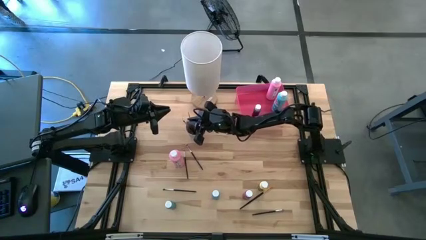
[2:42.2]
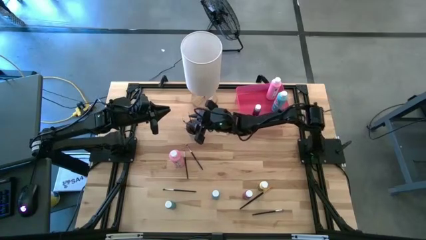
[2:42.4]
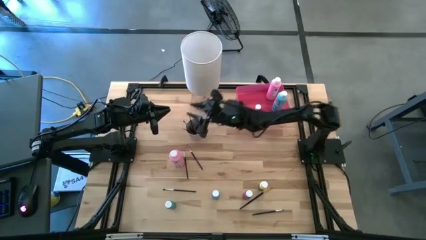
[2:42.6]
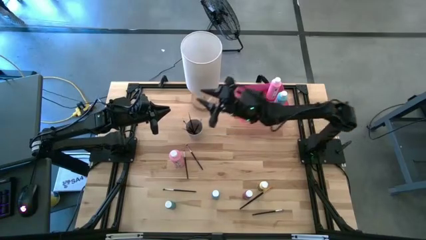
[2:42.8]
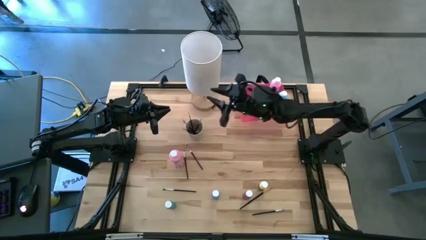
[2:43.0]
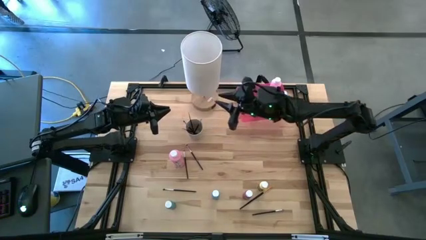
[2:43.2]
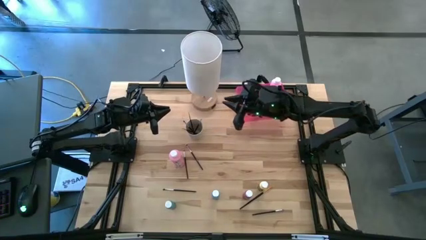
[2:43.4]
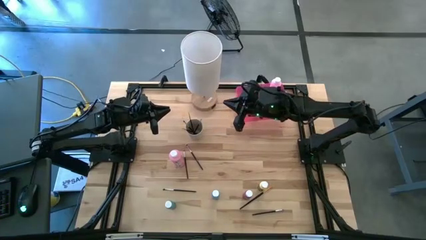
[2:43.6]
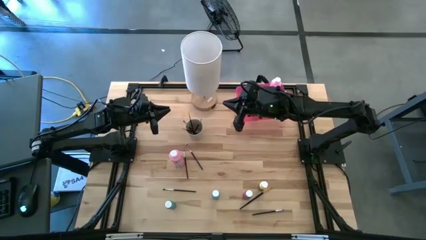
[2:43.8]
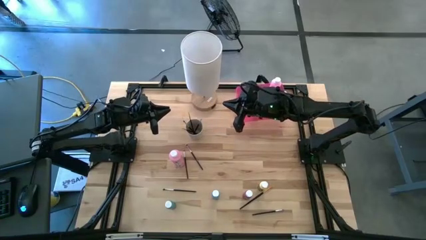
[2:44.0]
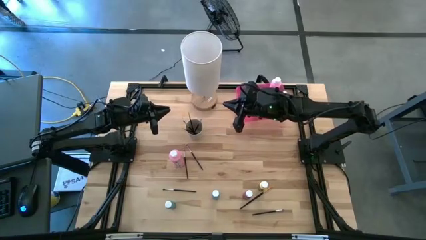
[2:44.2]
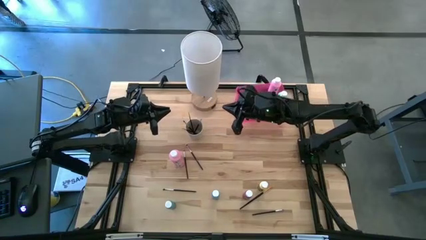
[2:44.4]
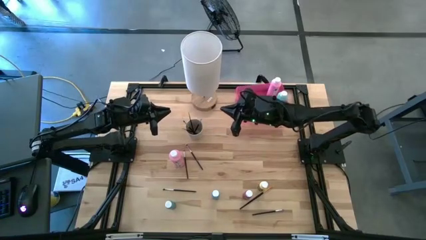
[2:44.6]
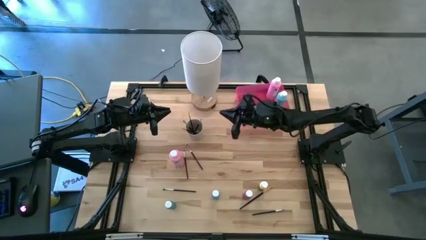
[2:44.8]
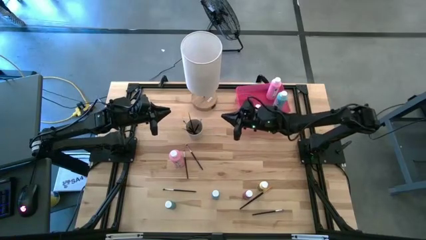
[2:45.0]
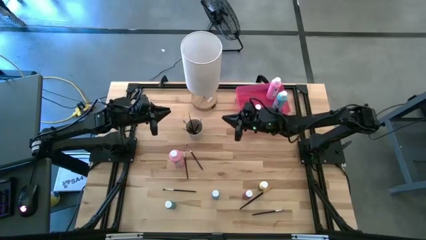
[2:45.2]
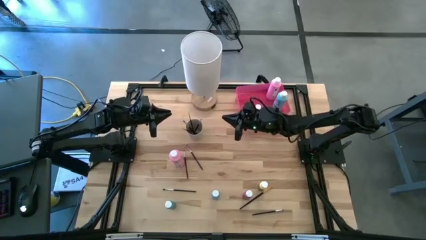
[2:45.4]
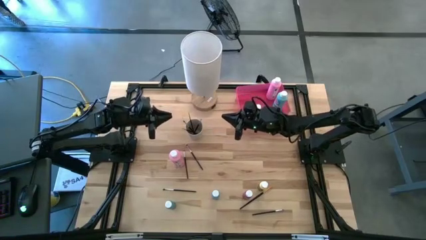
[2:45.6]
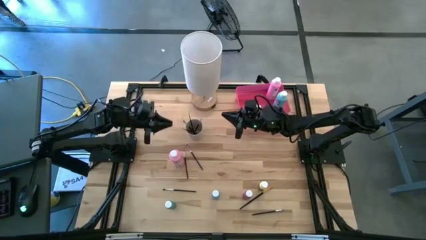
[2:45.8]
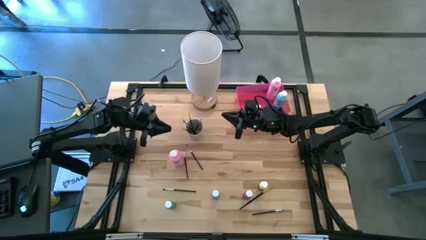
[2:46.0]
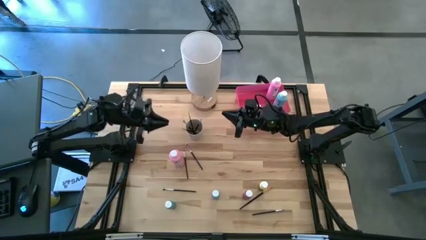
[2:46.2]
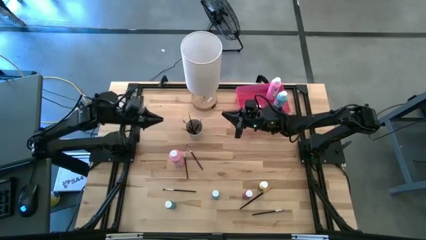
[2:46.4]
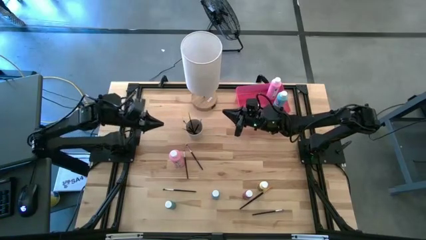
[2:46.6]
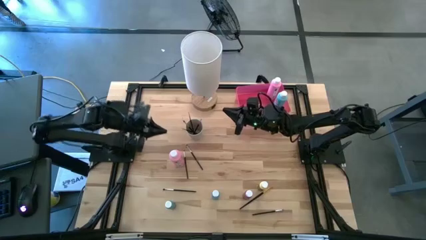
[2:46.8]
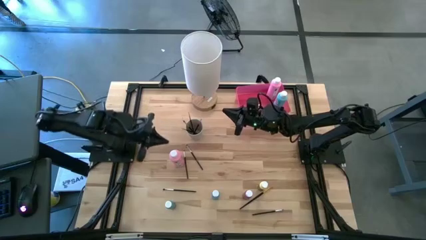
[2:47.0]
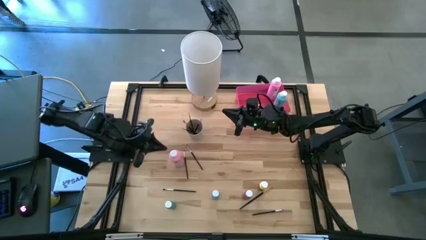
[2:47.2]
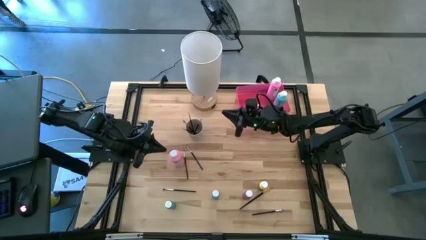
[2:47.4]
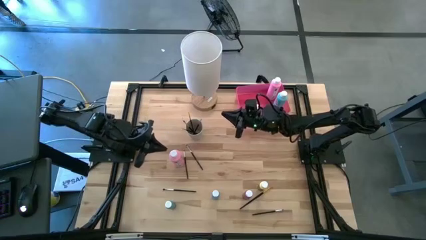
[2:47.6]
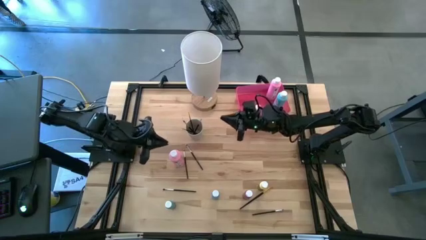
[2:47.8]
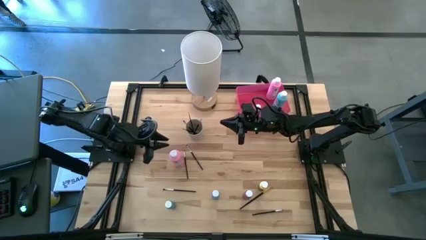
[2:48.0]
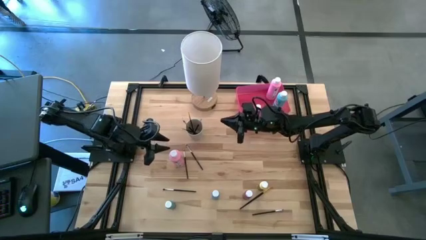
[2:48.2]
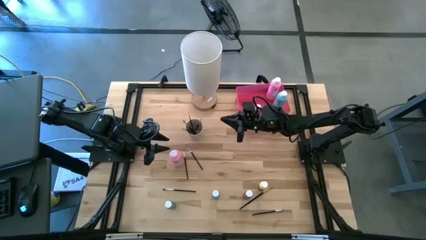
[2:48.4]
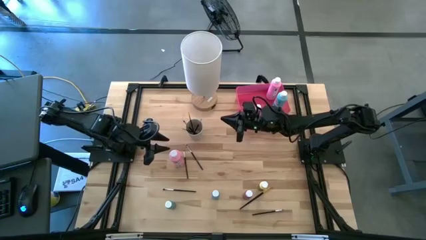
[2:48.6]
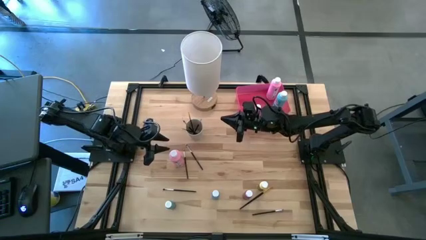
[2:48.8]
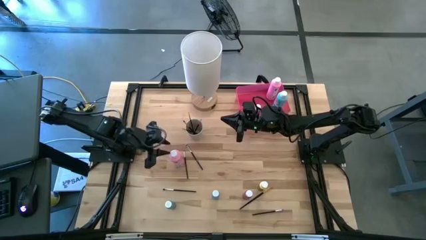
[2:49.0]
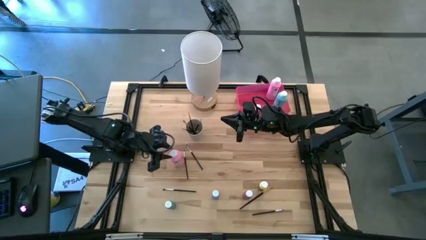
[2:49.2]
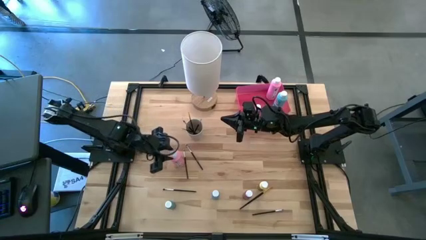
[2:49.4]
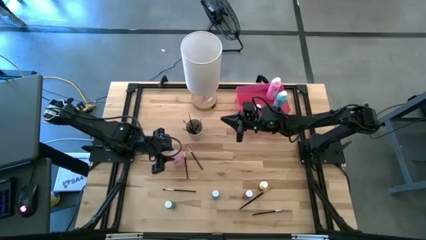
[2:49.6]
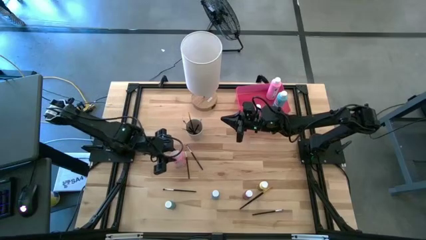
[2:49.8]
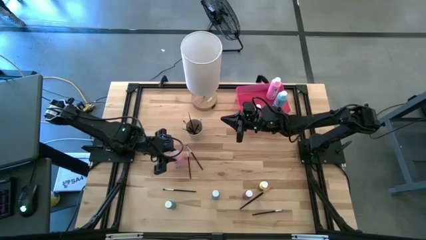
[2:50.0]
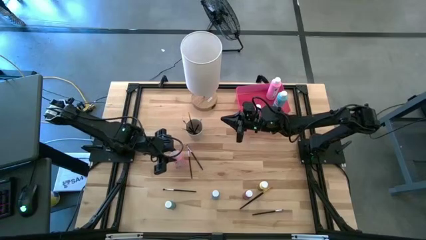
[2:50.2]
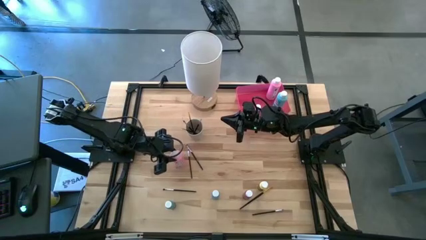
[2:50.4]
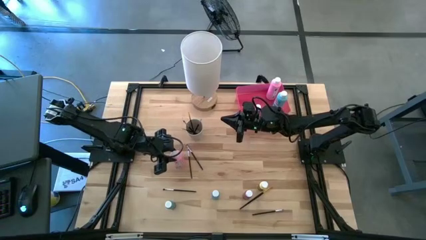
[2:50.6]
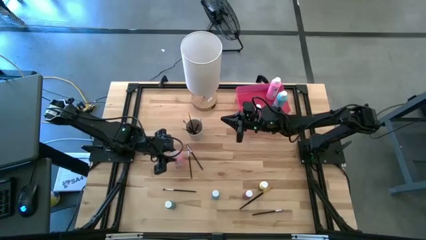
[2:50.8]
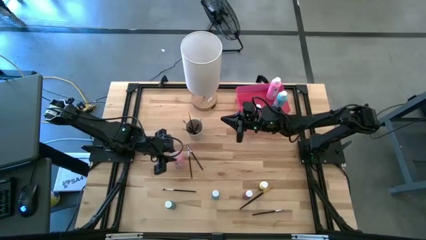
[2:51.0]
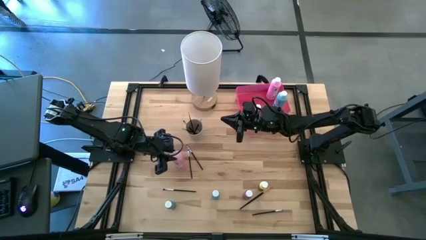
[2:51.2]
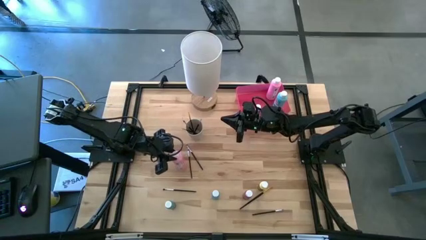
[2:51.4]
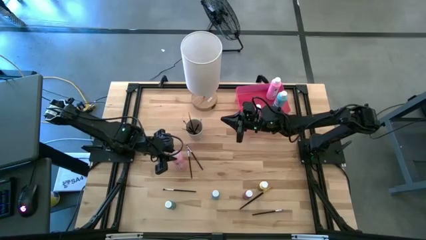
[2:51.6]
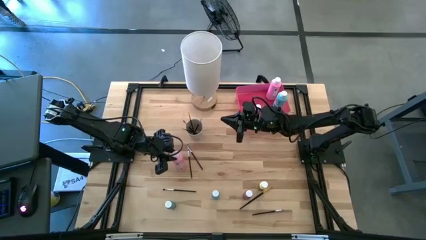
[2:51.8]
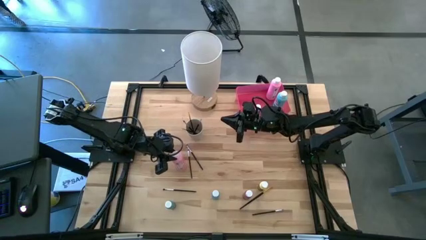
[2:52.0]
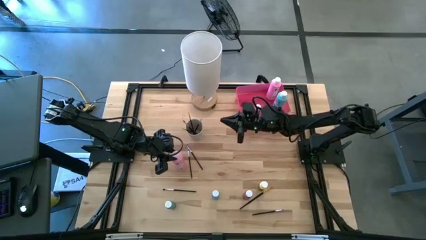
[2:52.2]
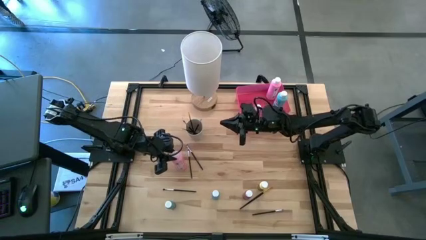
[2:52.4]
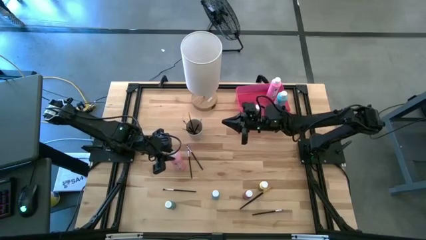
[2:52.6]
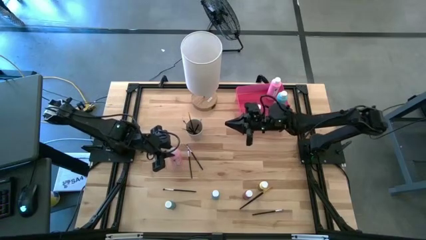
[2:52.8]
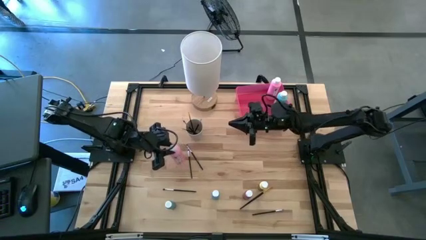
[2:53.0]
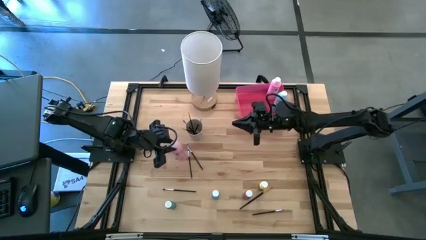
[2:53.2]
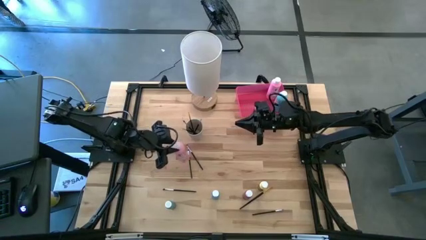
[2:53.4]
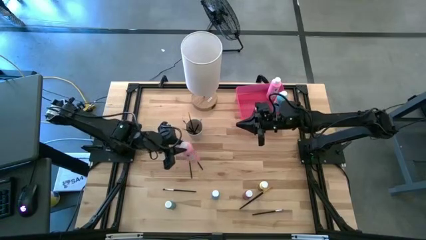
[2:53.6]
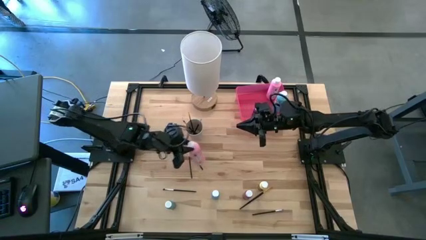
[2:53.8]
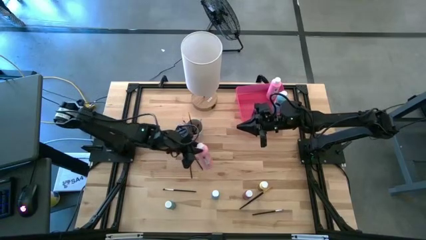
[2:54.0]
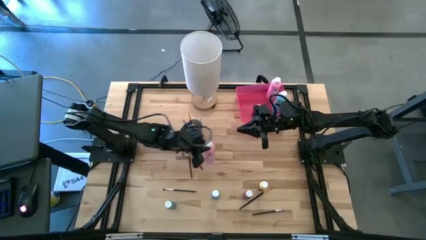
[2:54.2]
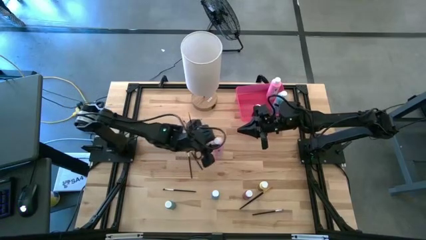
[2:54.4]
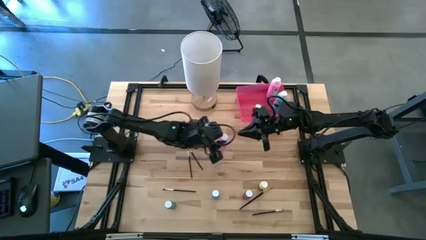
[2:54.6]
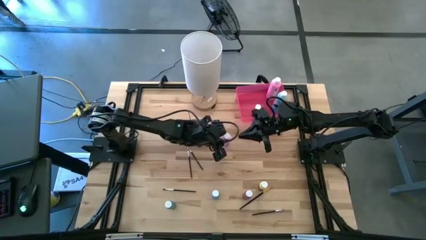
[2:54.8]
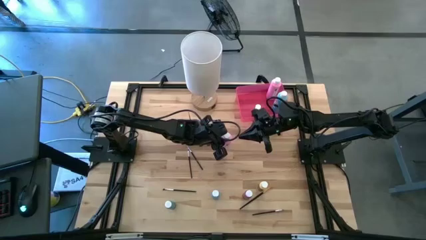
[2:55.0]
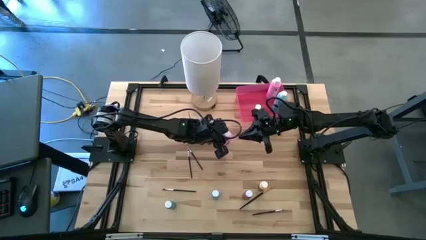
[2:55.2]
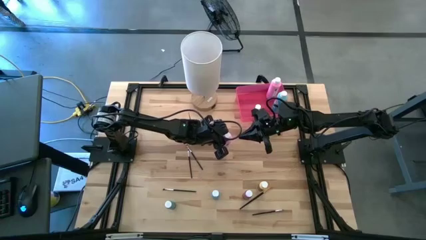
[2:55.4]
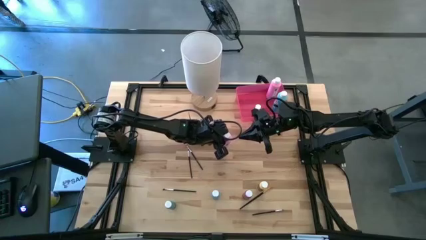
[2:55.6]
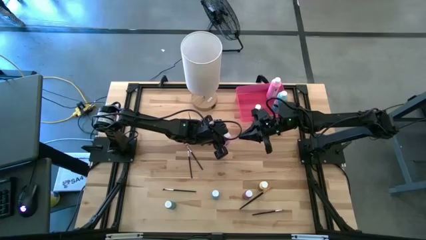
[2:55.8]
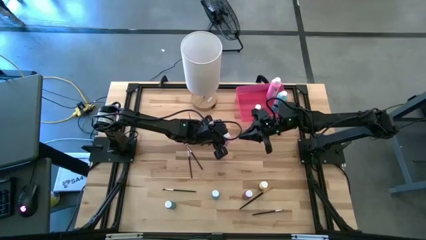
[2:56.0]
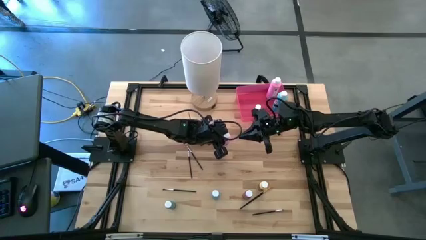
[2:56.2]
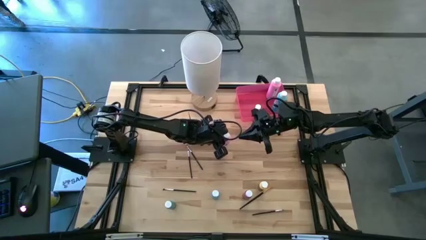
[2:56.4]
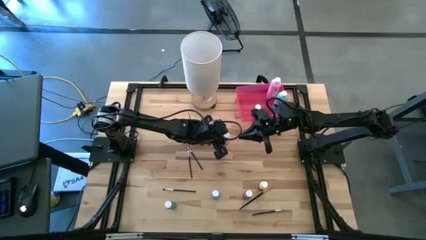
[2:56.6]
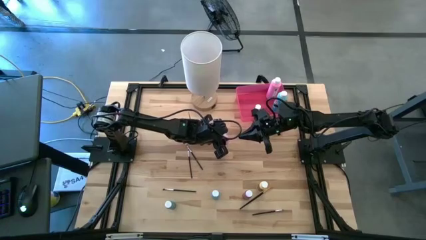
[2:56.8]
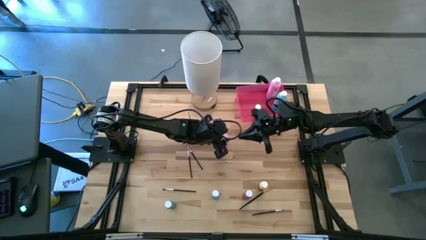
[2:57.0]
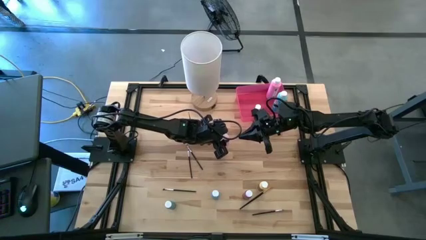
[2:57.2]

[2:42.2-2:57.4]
Task: Pick & Place Paint Supplies
Put the big pink paint bottle into the pink bin
